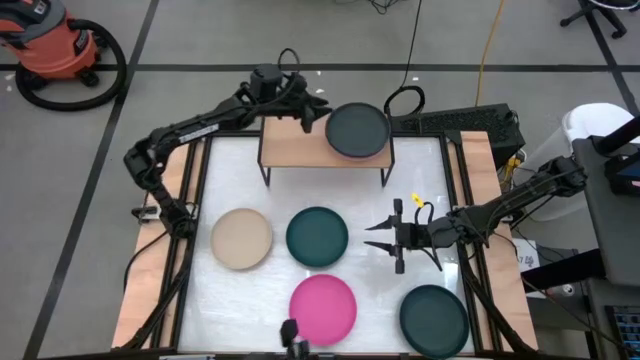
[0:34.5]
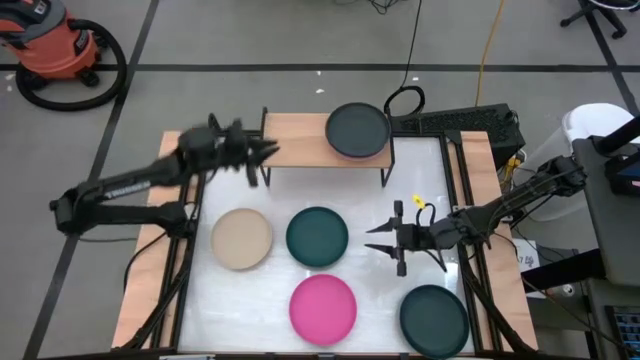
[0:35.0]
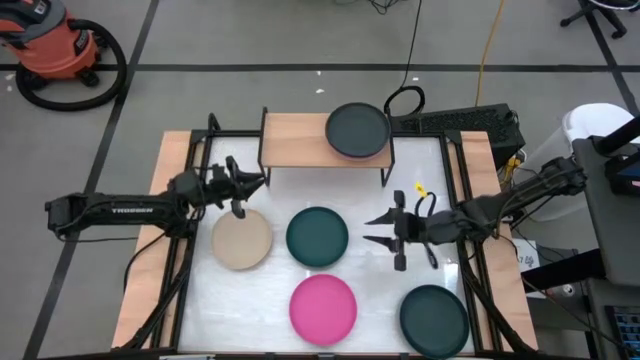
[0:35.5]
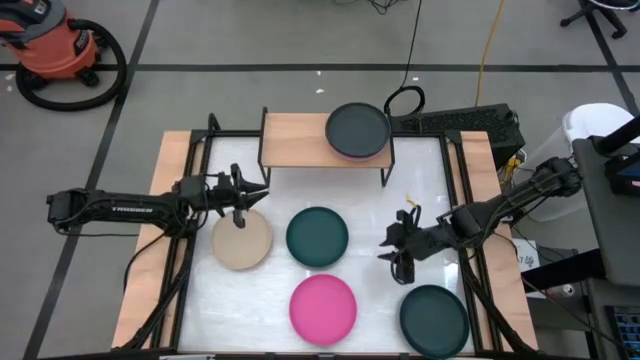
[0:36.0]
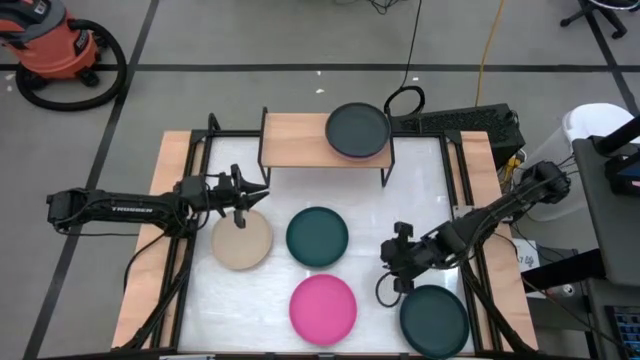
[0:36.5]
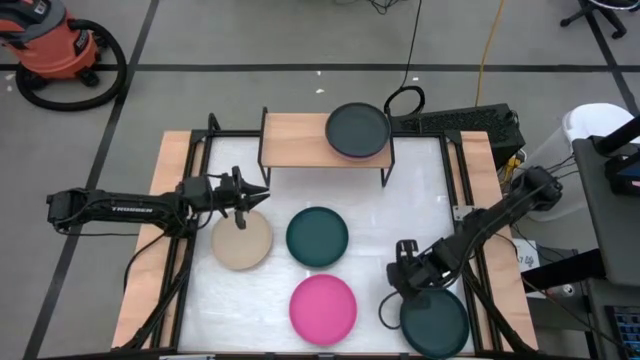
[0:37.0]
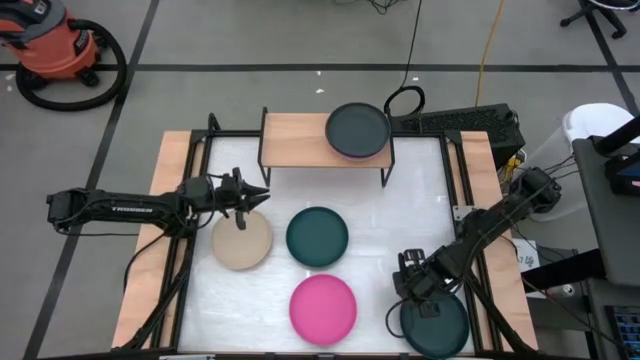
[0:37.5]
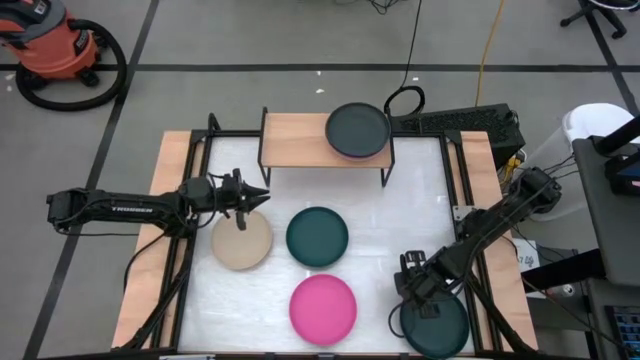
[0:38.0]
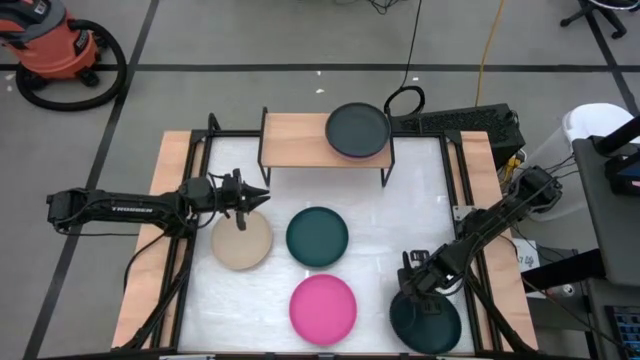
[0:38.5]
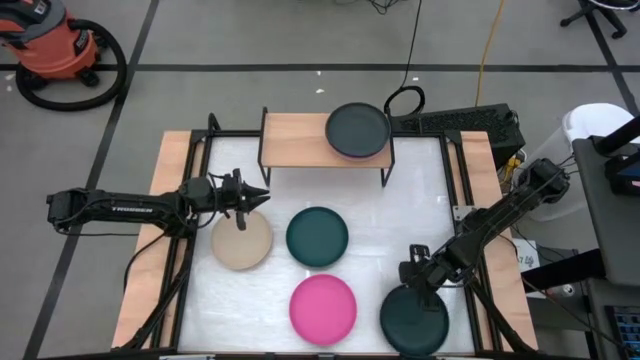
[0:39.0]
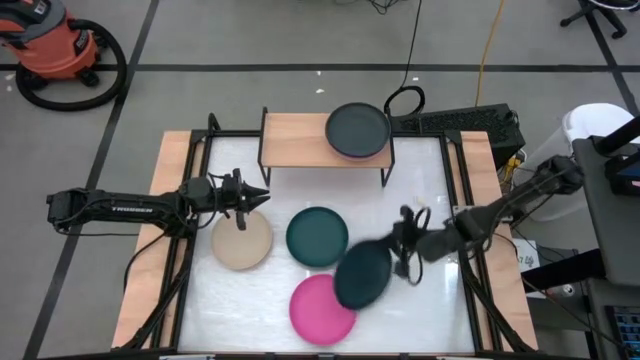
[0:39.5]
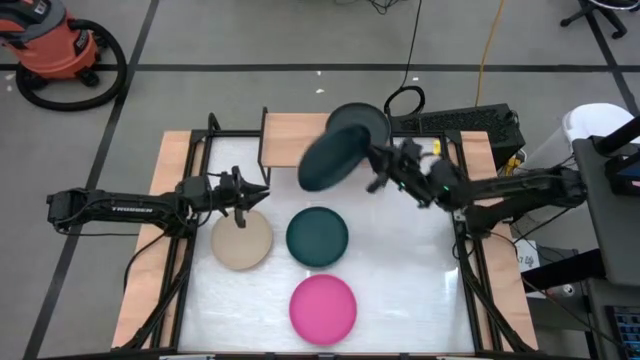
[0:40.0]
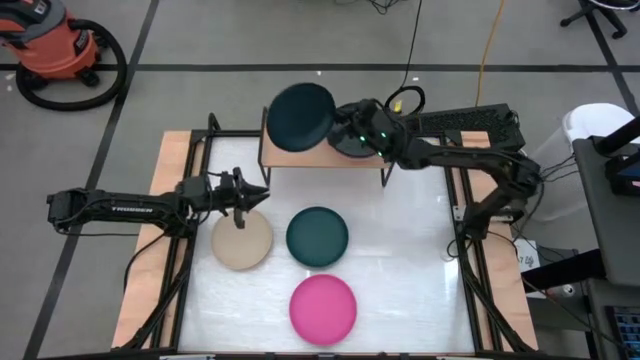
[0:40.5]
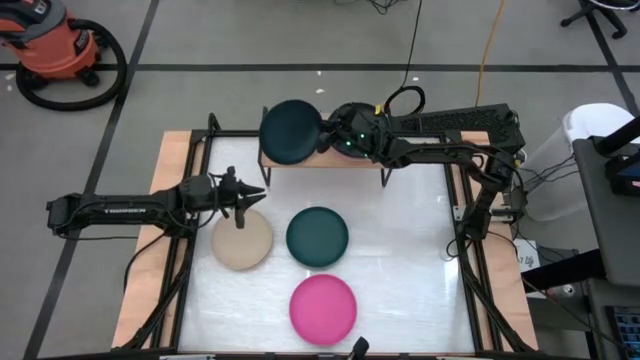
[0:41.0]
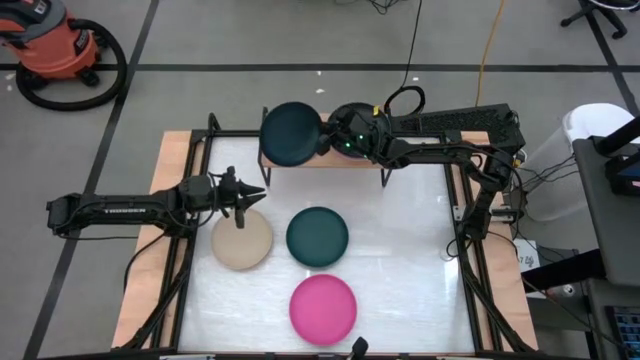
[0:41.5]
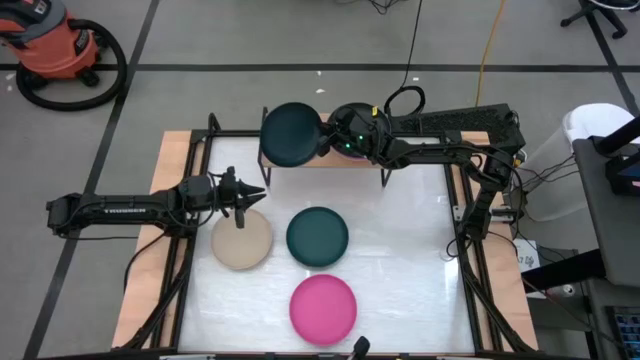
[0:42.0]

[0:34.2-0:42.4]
Task: Place and stack plates onto a shelf
Put the dark blue plate on the shelf

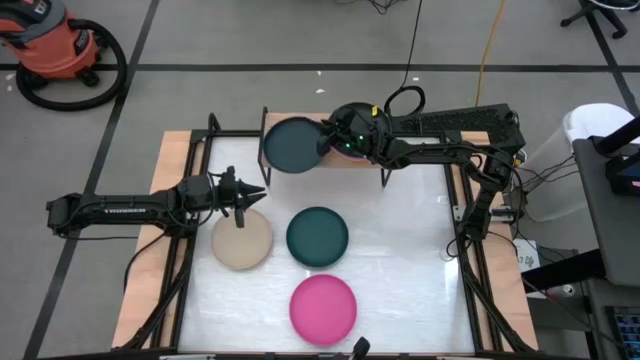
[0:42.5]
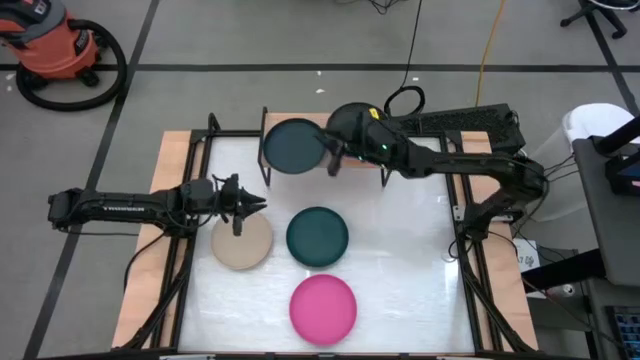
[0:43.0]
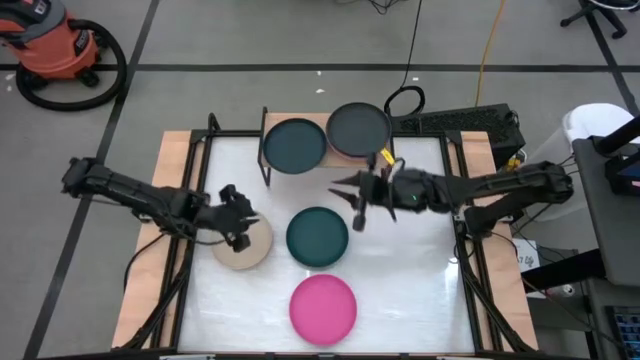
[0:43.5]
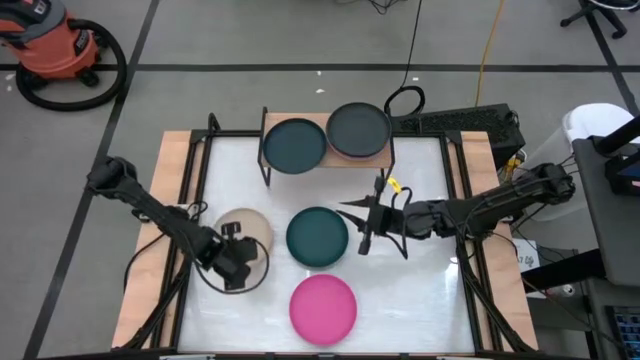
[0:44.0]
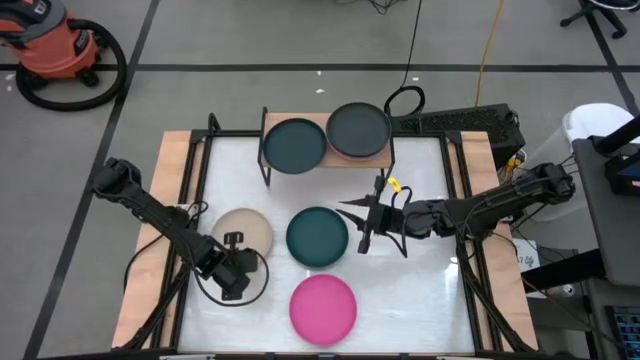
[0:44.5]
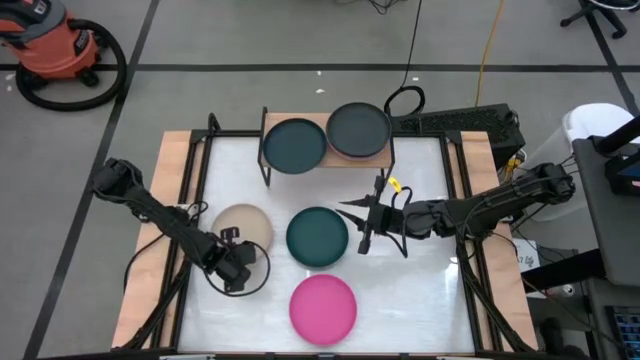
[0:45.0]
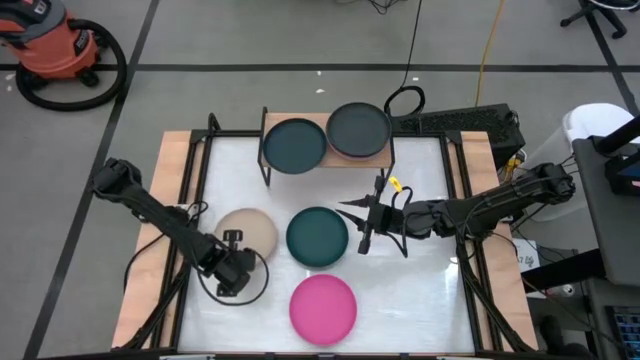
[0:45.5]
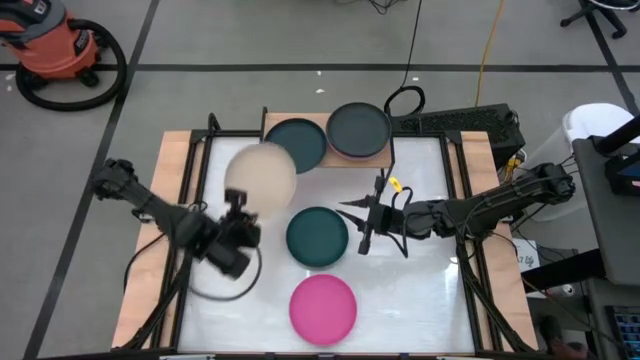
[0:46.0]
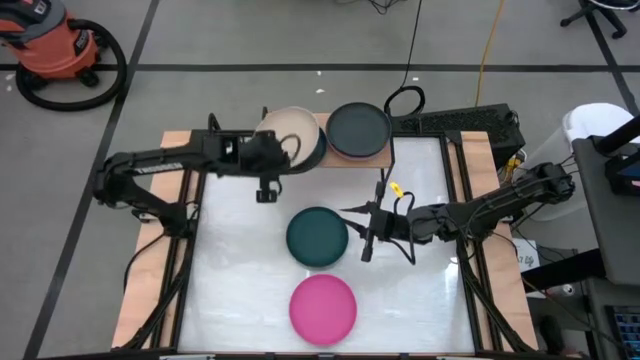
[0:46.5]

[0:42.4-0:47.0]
Stack the light brown plate on the dark blue plate

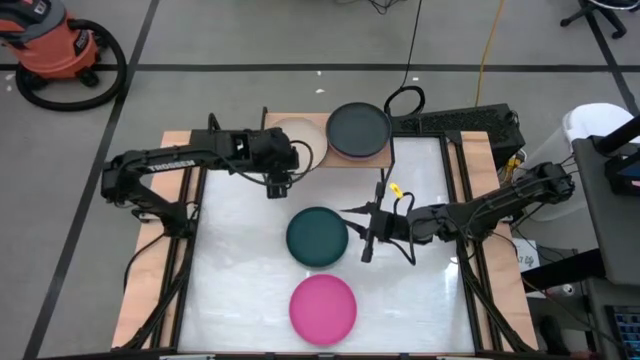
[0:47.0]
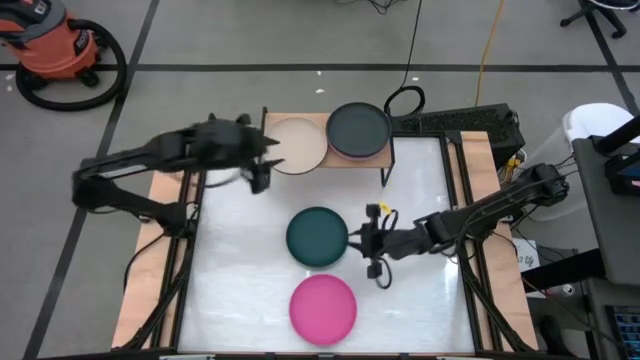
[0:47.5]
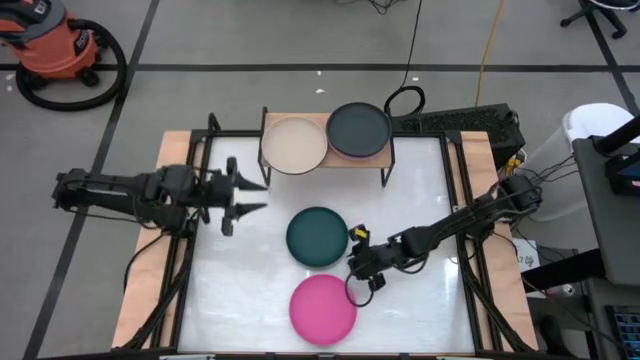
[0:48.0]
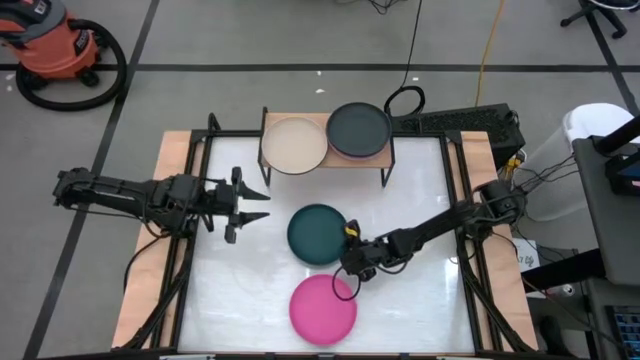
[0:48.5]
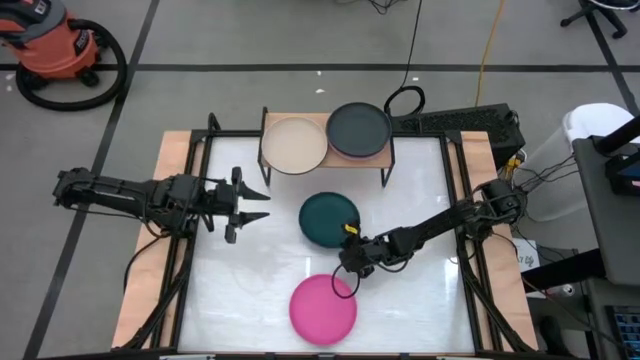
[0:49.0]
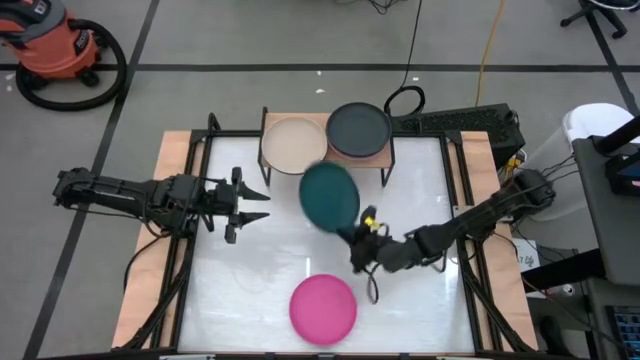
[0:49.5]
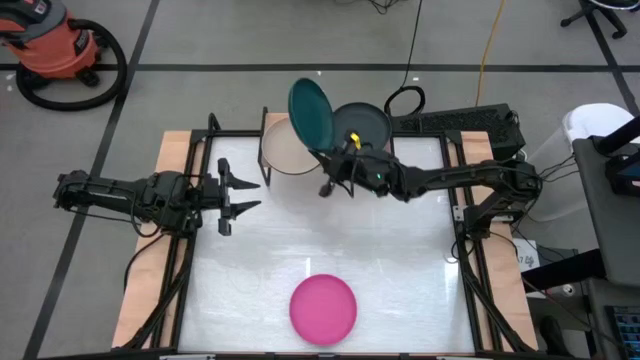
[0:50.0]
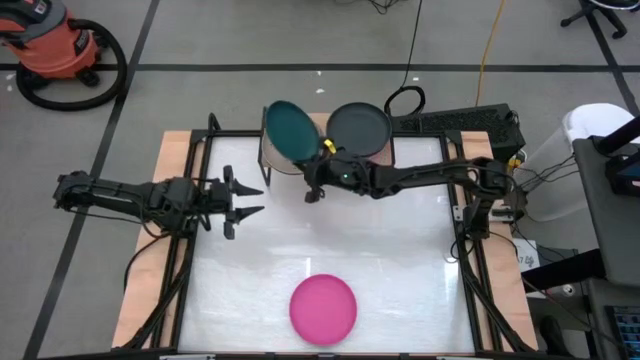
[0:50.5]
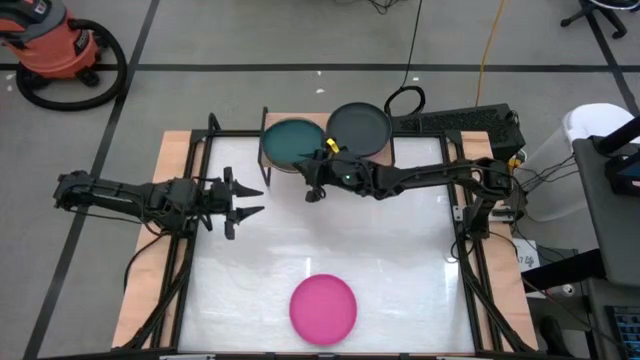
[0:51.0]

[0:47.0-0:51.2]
Stack the dark green plate on the light brown plate

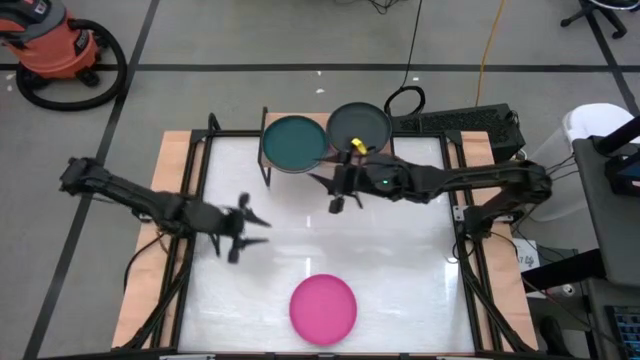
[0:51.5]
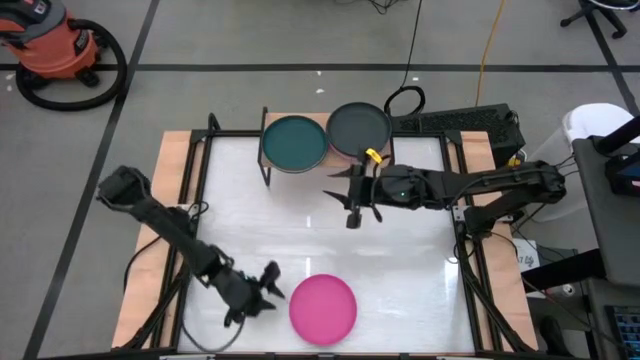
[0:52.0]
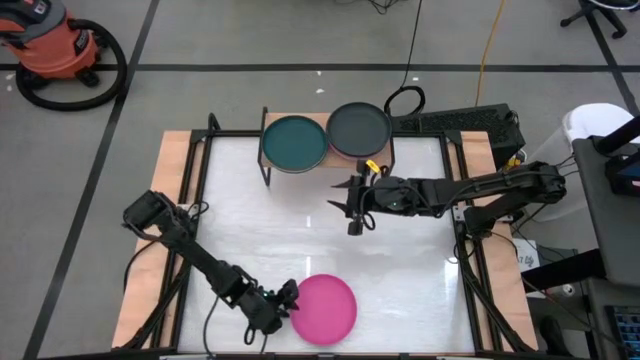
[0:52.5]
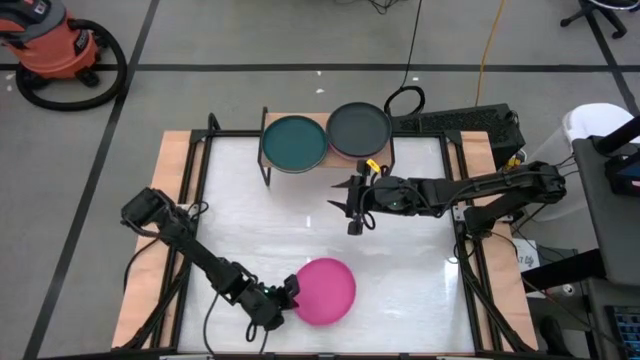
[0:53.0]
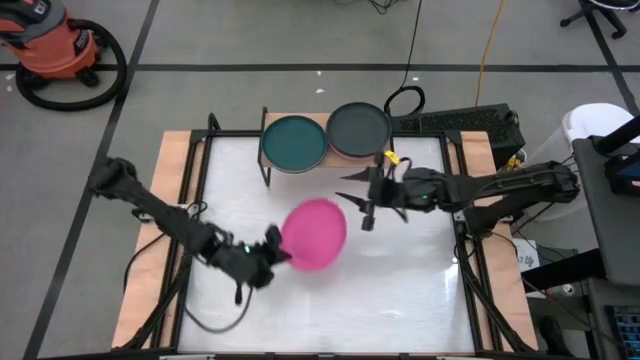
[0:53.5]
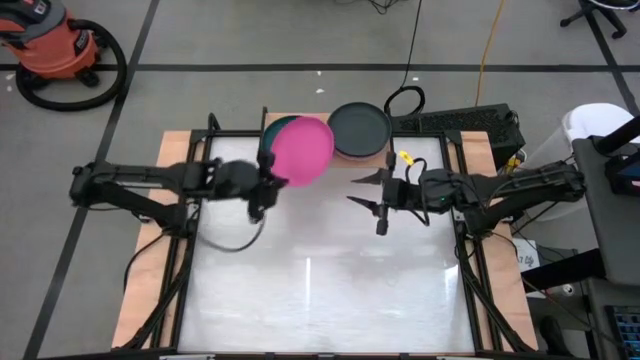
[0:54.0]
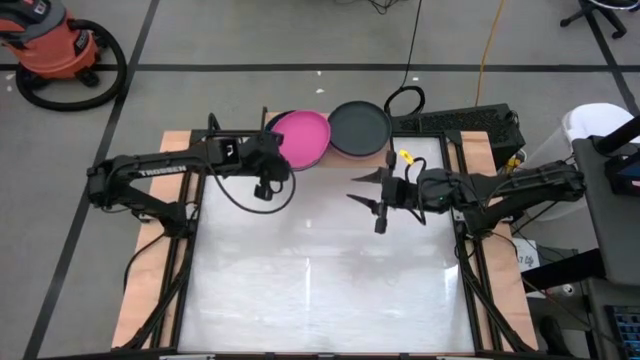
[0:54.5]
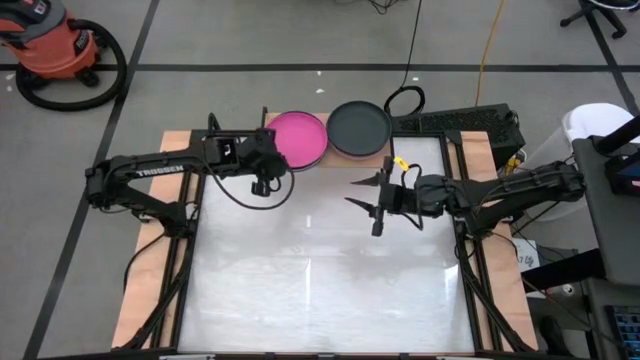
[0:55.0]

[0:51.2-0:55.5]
Stack the pink plate on the dark green plate
